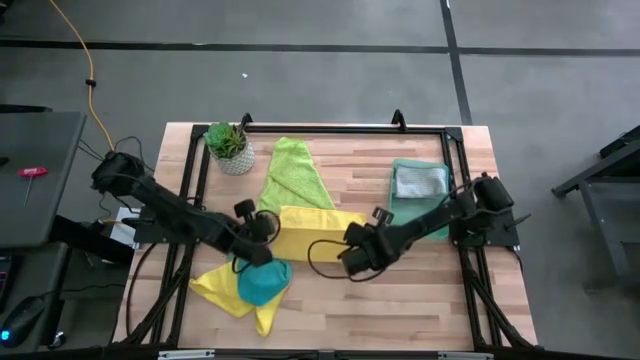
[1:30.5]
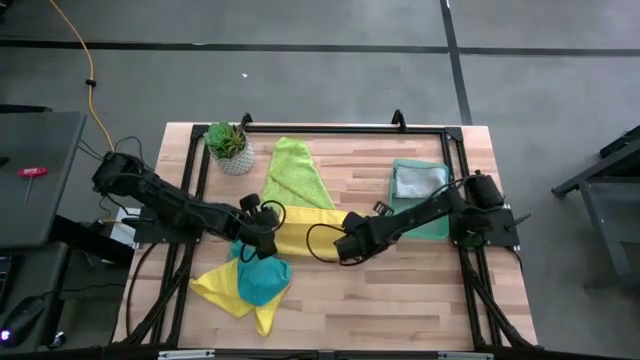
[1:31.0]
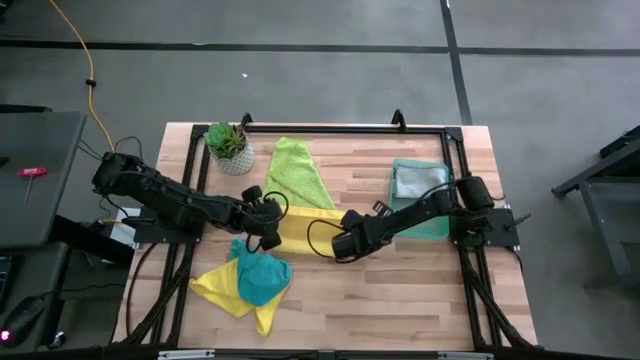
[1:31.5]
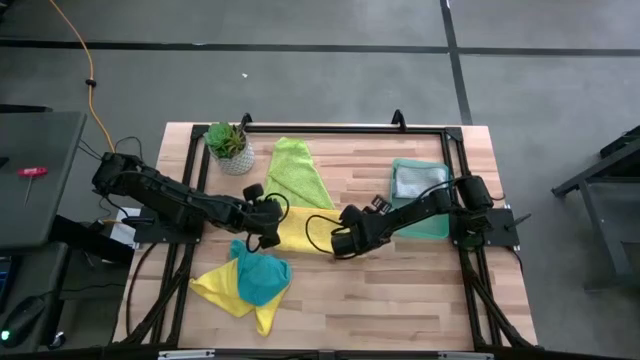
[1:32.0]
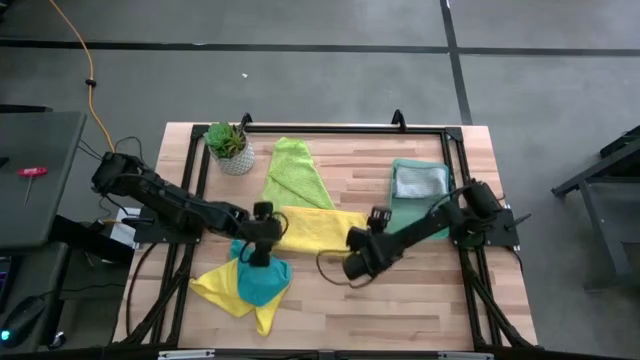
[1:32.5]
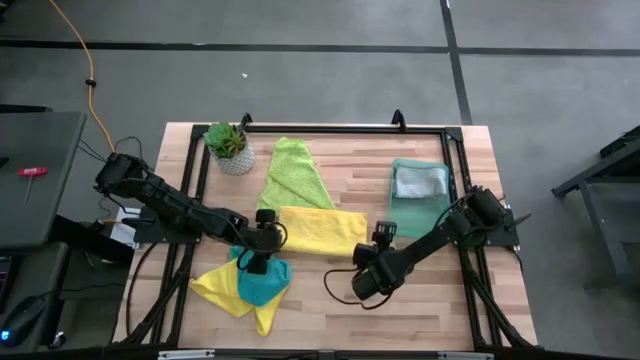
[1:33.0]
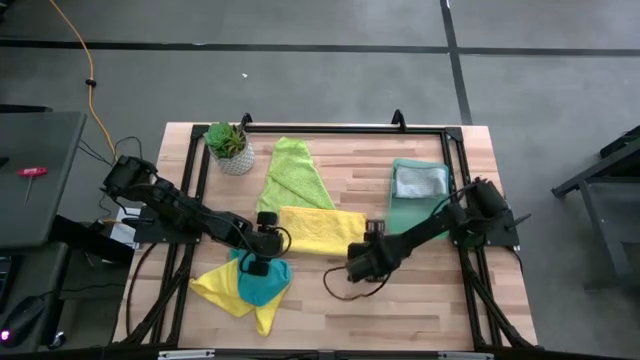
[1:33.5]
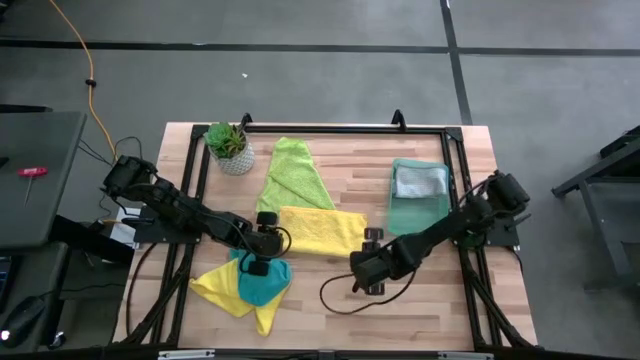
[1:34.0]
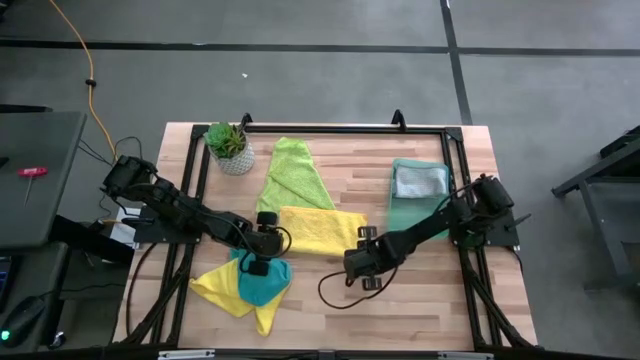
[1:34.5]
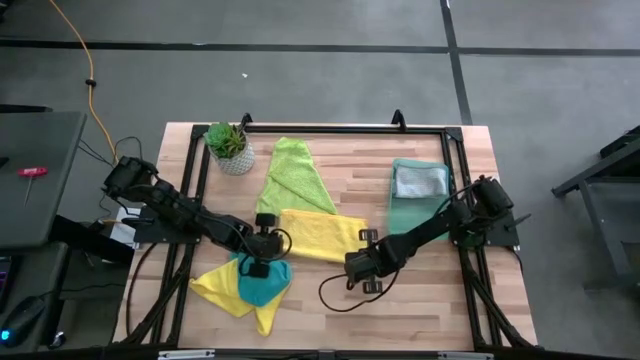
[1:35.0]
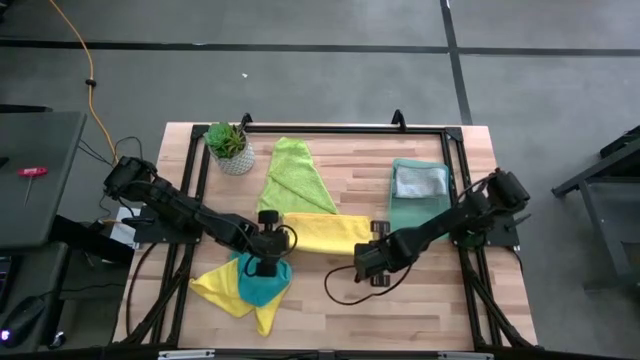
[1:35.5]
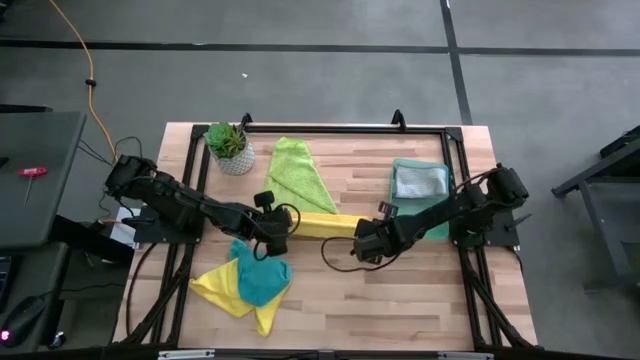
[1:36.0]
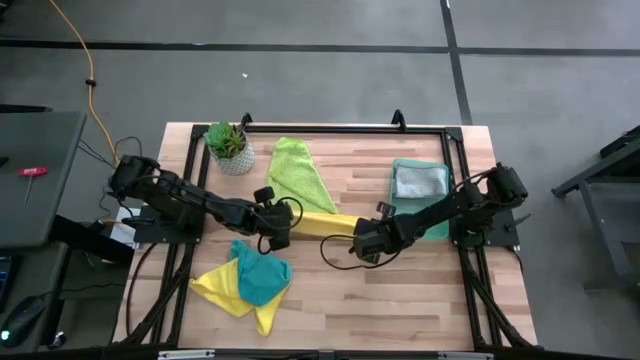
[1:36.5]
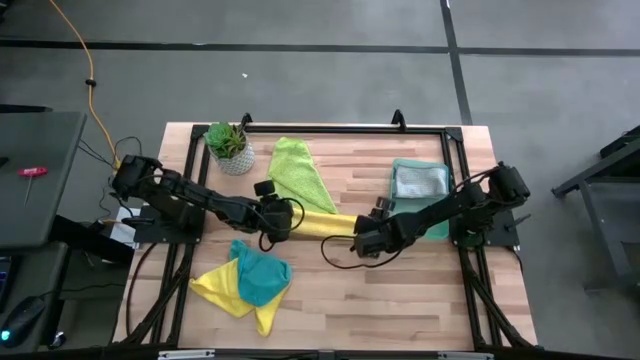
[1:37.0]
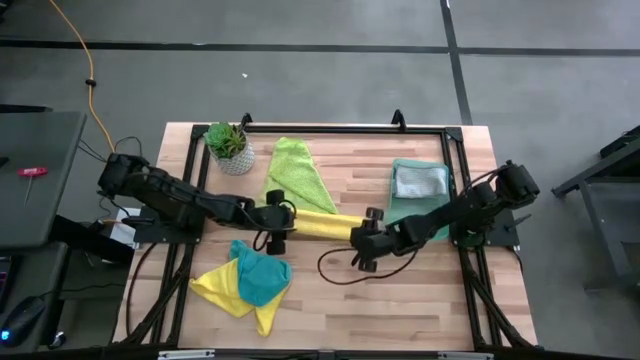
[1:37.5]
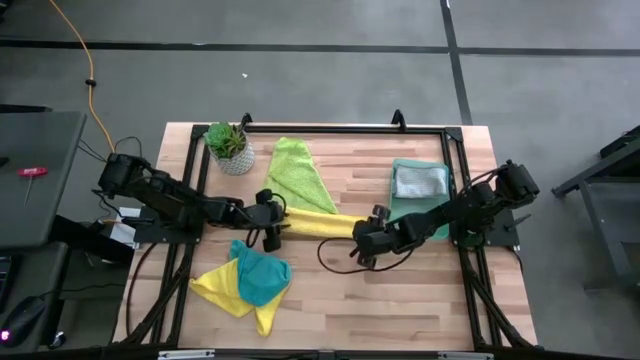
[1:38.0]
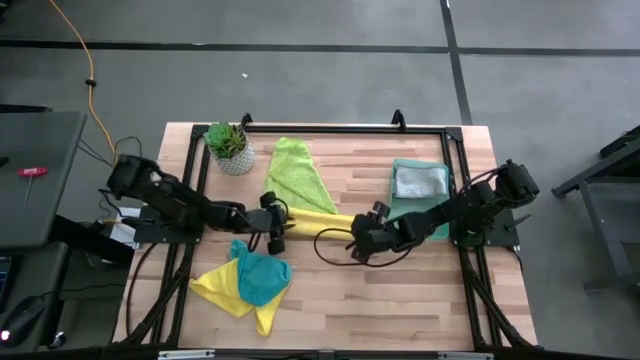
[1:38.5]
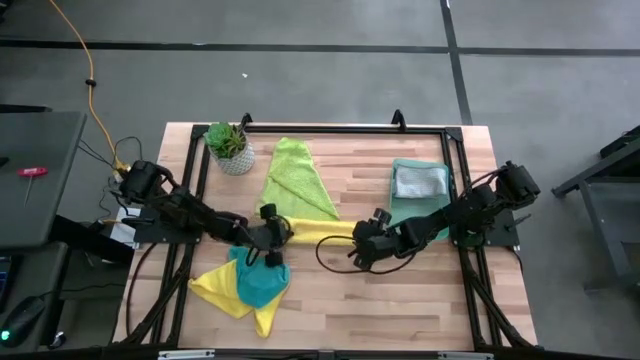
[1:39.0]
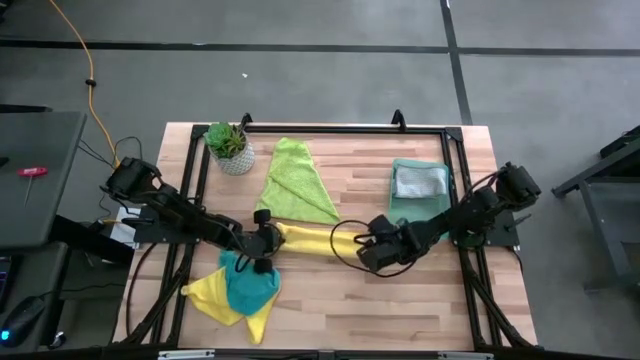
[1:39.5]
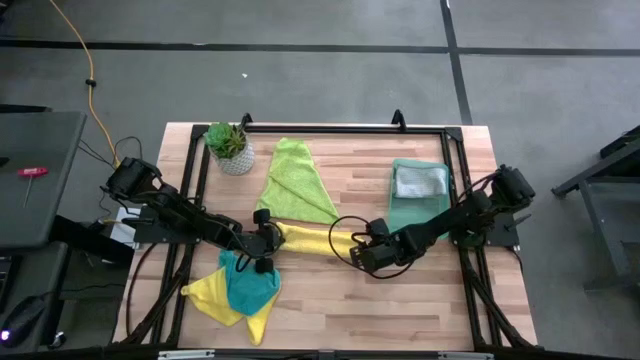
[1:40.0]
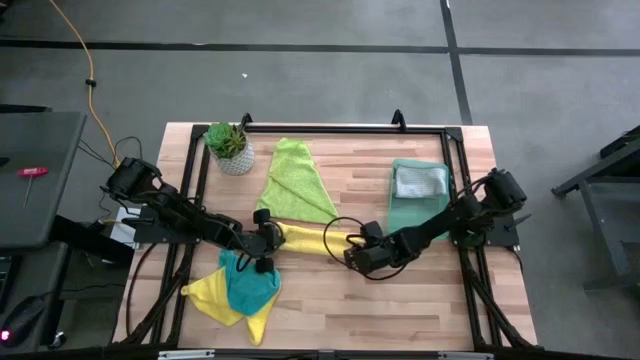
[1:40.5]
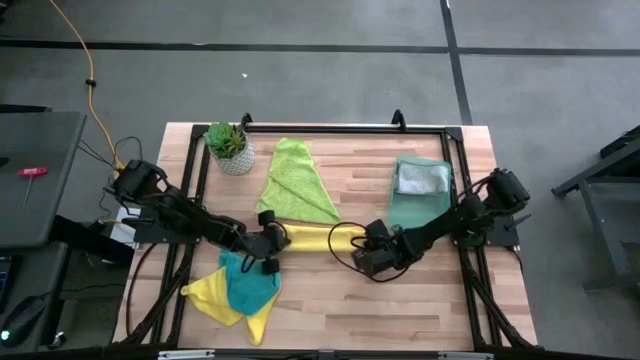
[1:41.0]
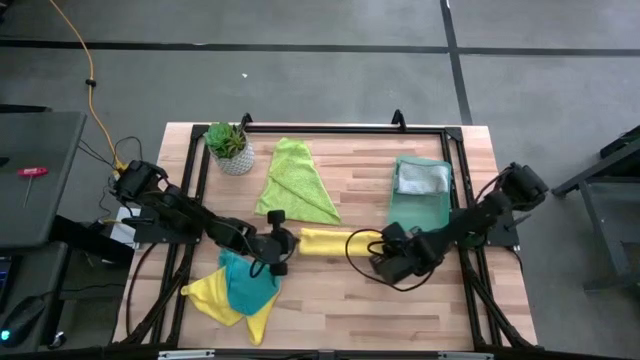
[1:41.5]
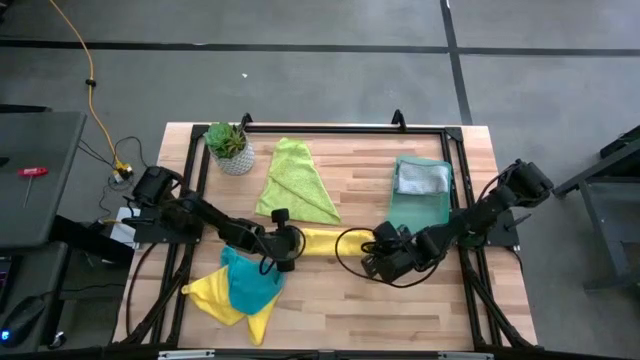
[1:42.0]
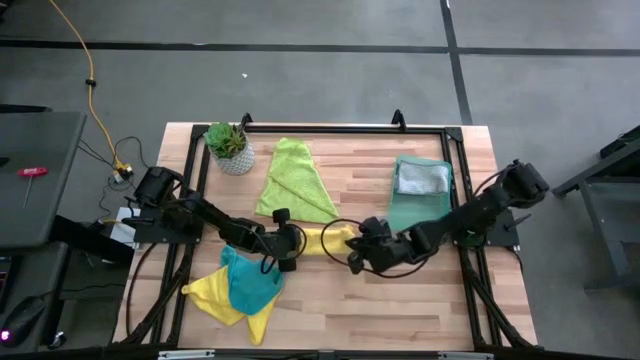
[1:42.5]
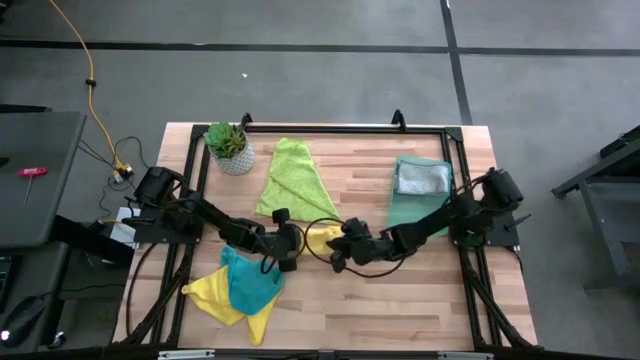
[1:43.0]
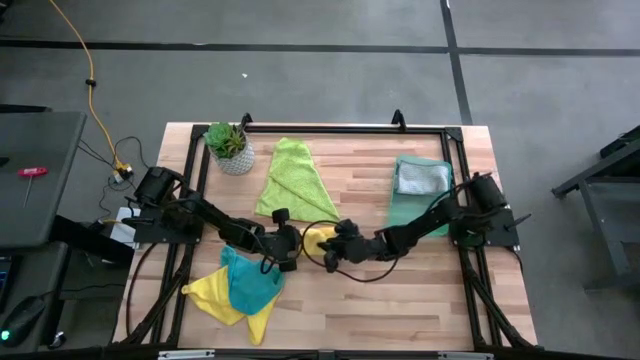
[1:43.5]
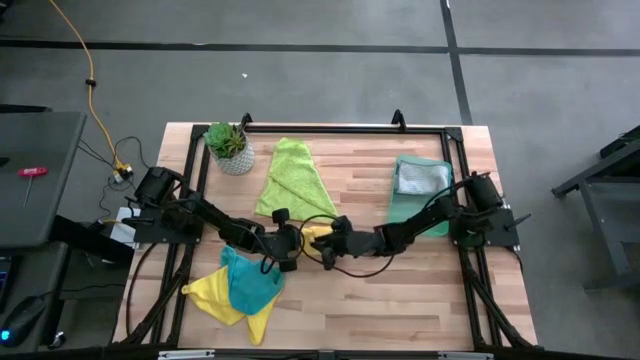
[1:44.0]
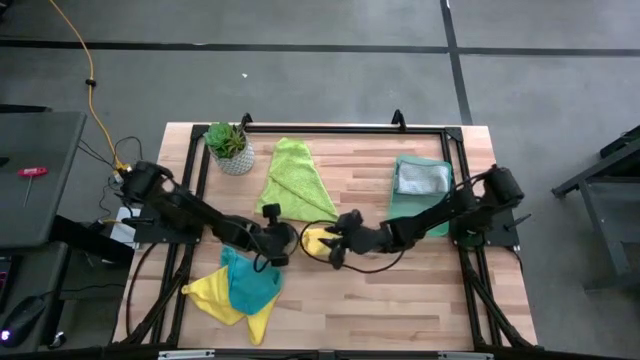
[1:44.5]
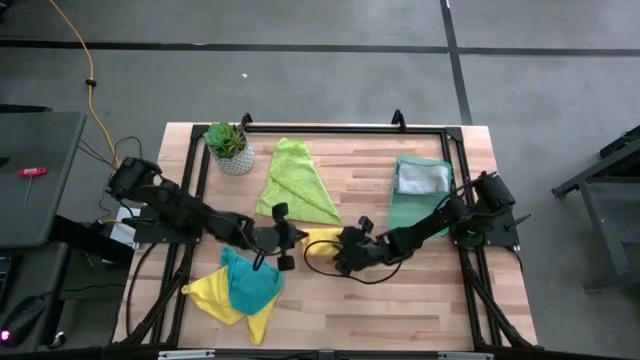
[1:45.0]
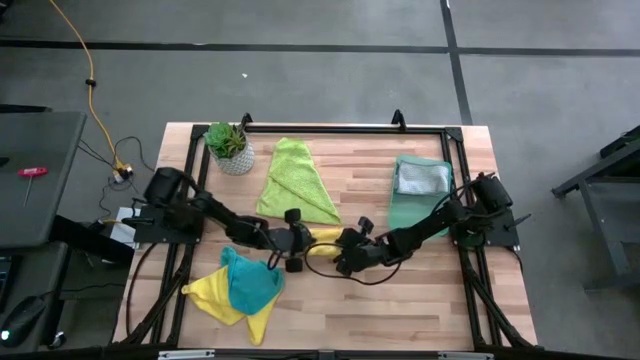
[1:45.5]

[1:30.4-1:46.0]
Task: Fold microfiber towels
Fold the top yellow microfiber cloth

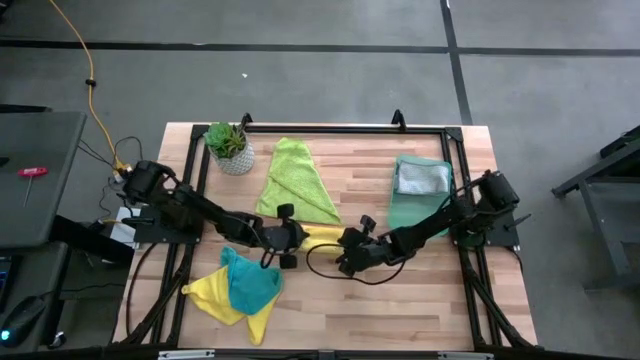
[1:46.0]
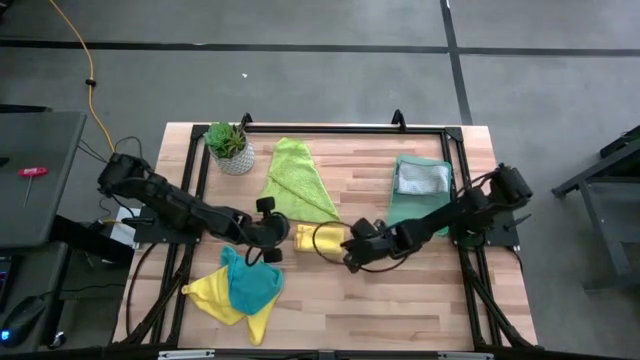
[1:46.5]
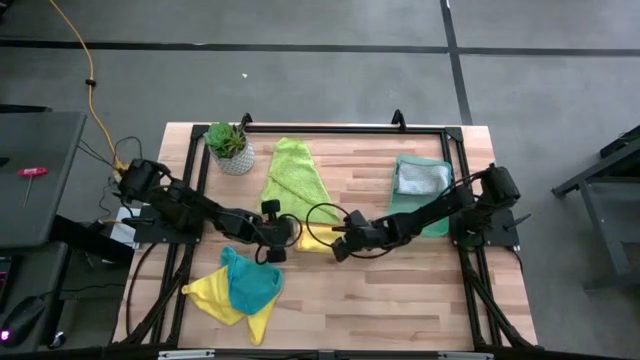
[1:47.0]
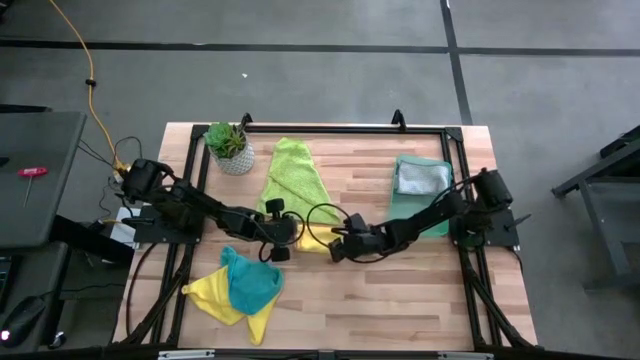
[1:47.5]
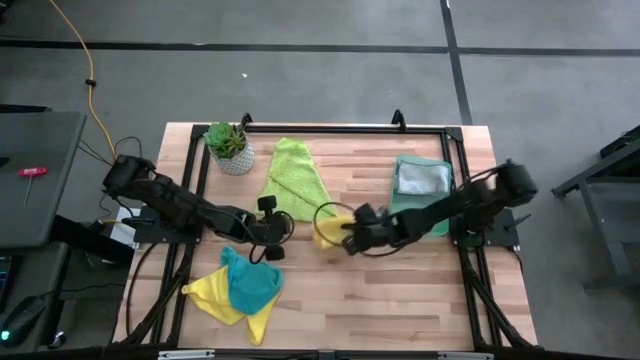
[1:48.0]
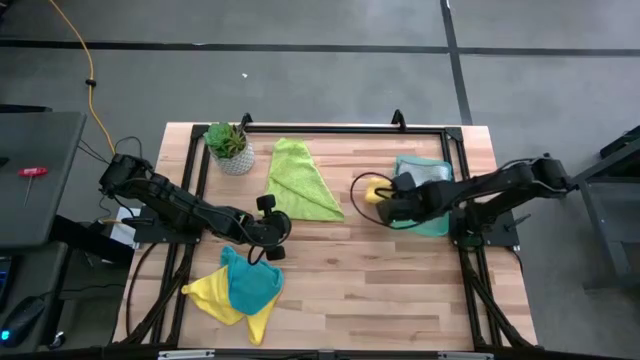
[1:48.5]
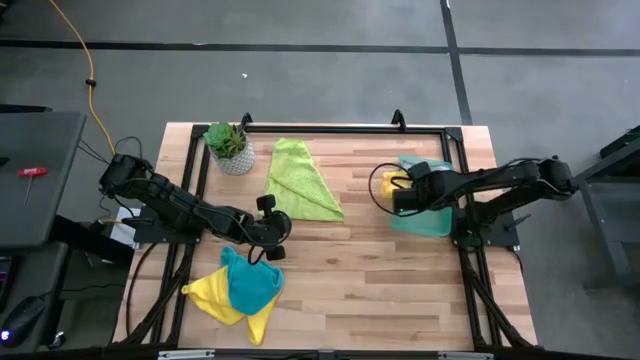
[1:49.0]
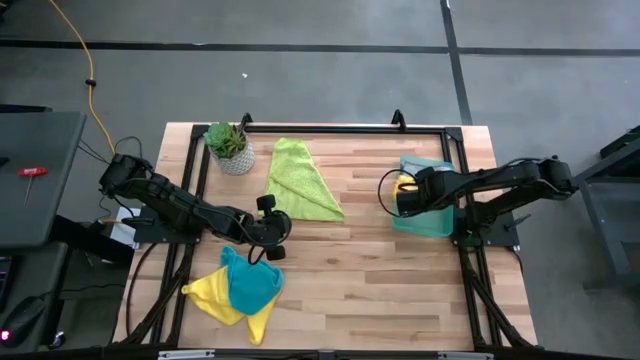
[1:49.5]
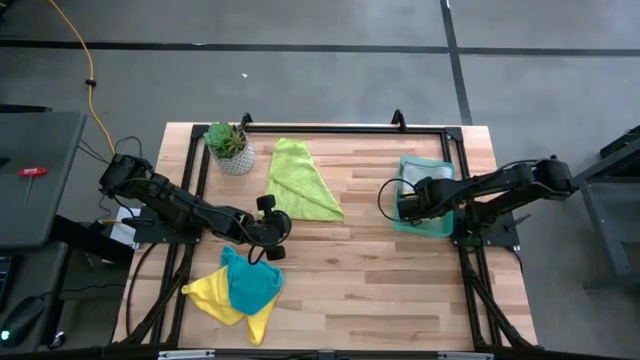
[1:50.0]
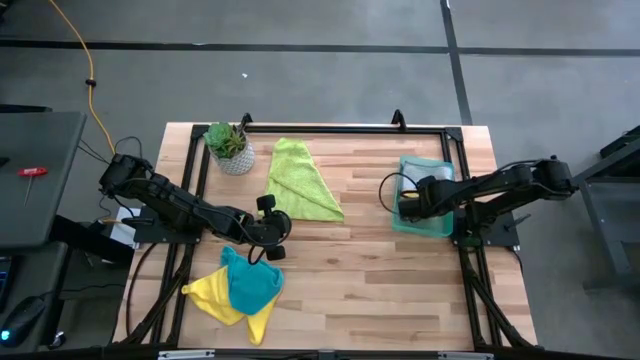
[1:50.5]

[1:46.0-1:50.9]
Put the top yellow microfiber cloth into the blue bin
